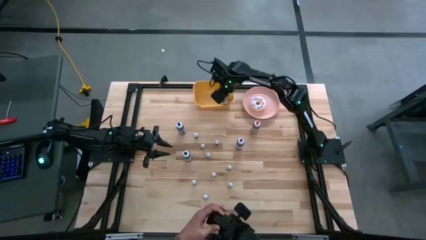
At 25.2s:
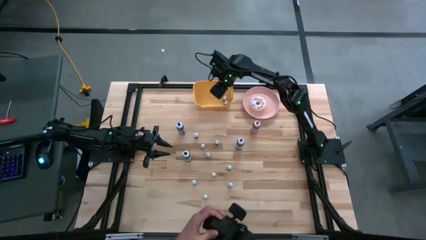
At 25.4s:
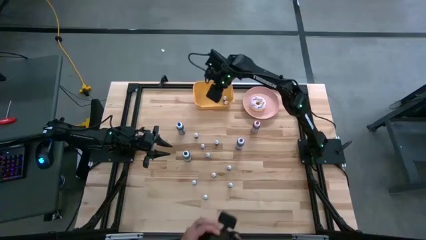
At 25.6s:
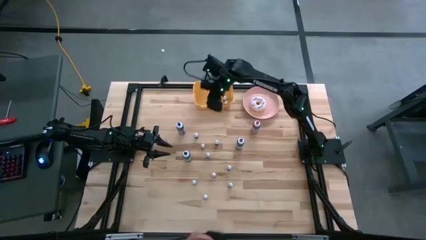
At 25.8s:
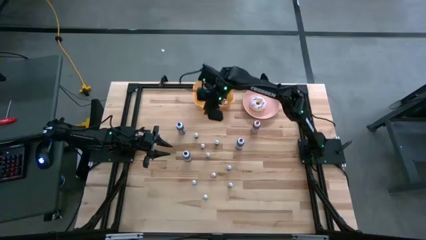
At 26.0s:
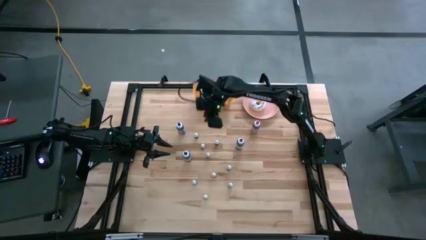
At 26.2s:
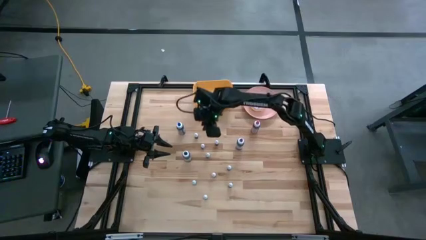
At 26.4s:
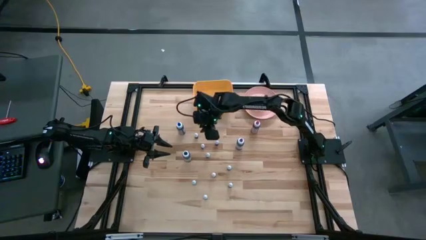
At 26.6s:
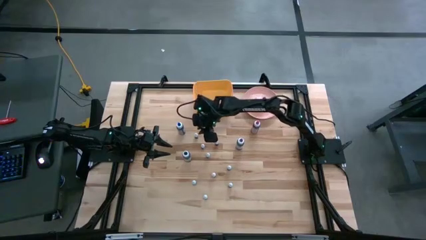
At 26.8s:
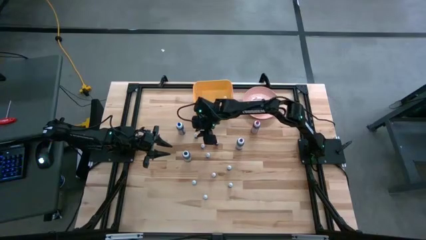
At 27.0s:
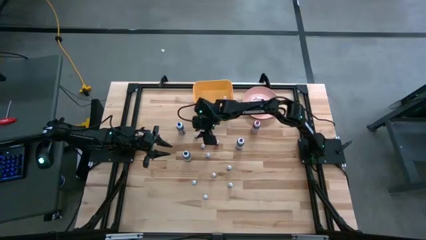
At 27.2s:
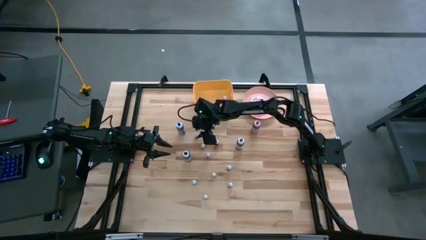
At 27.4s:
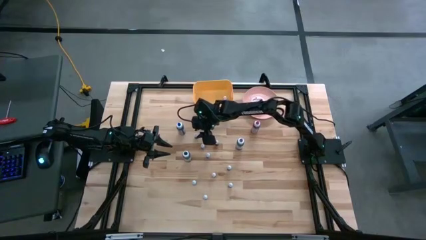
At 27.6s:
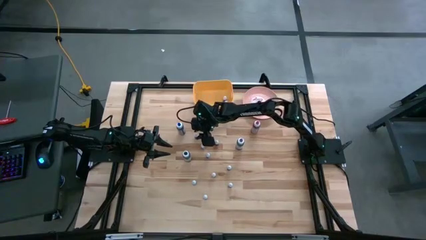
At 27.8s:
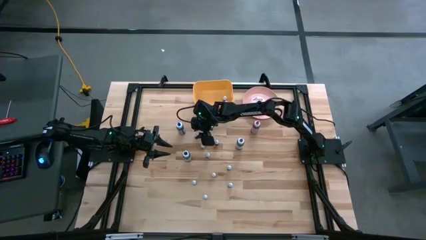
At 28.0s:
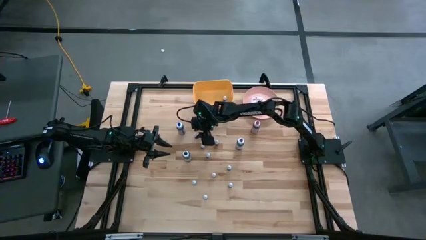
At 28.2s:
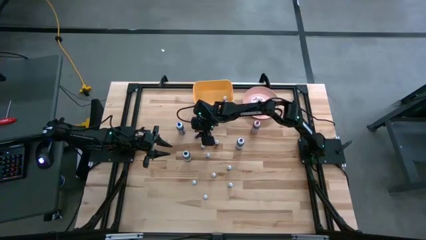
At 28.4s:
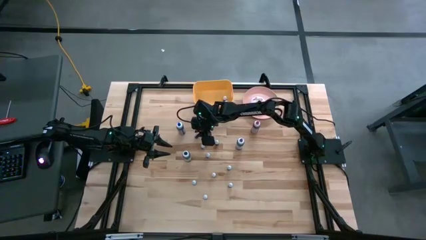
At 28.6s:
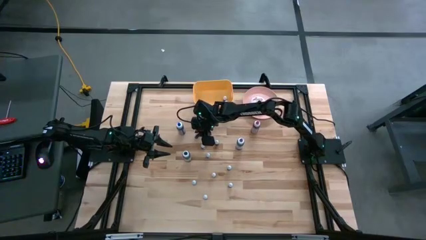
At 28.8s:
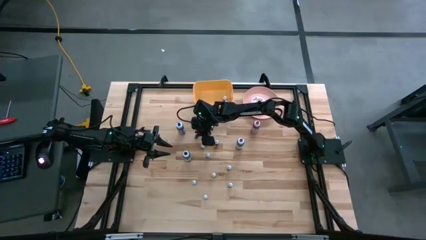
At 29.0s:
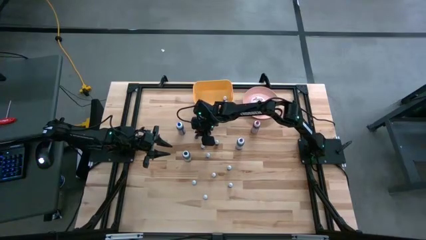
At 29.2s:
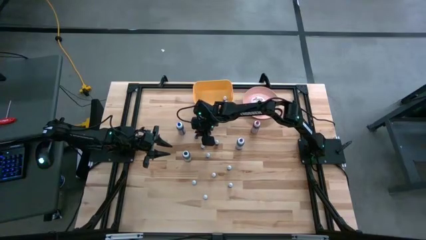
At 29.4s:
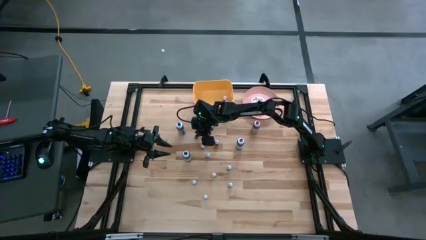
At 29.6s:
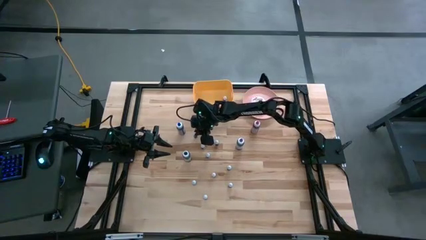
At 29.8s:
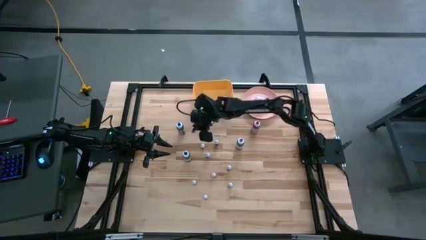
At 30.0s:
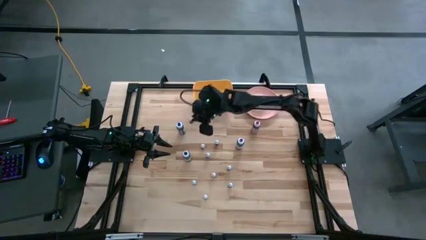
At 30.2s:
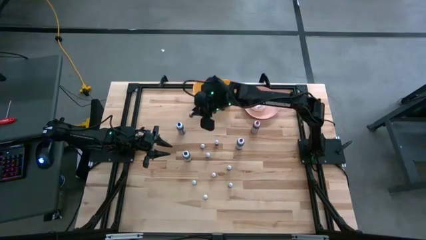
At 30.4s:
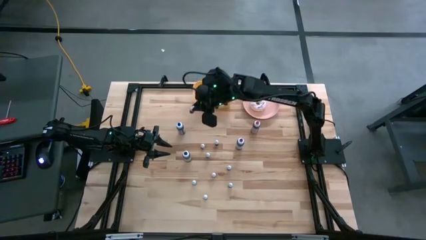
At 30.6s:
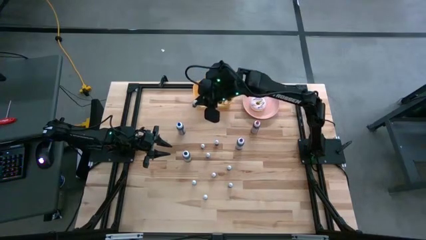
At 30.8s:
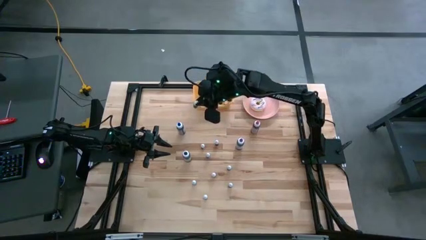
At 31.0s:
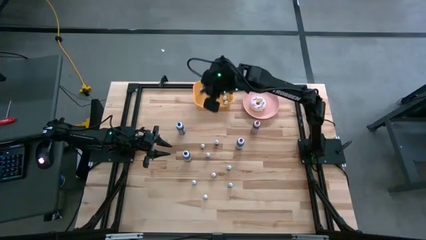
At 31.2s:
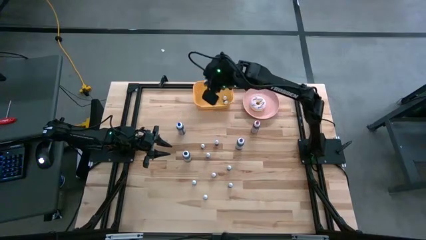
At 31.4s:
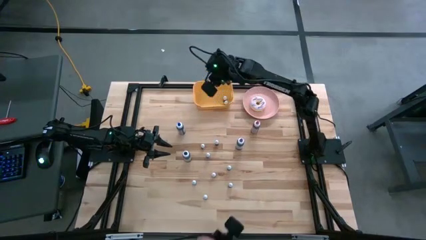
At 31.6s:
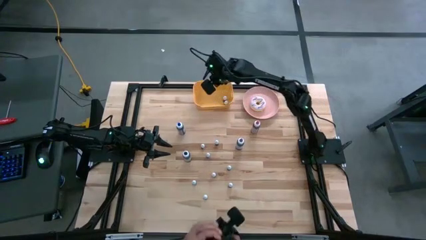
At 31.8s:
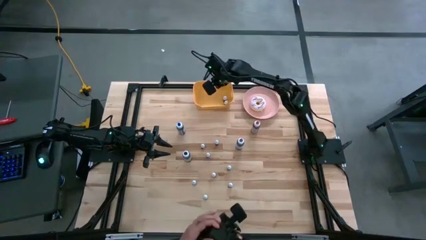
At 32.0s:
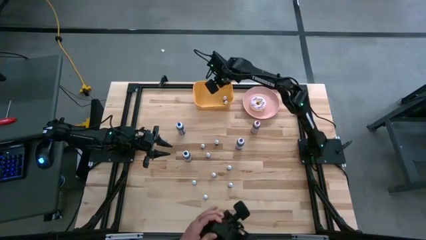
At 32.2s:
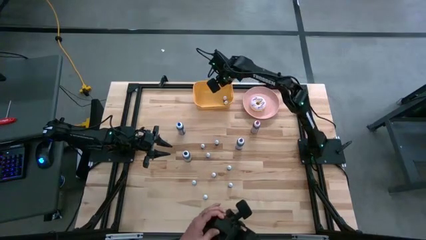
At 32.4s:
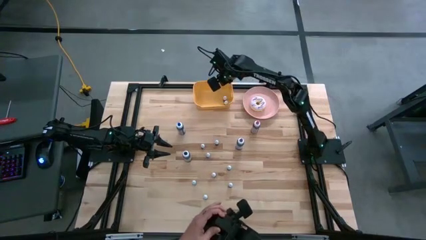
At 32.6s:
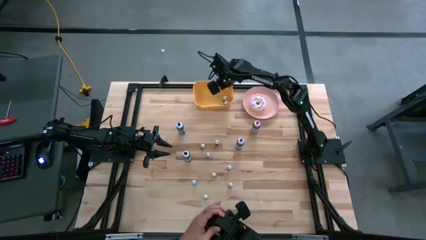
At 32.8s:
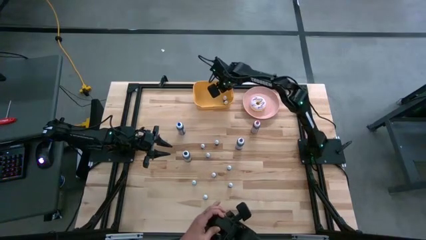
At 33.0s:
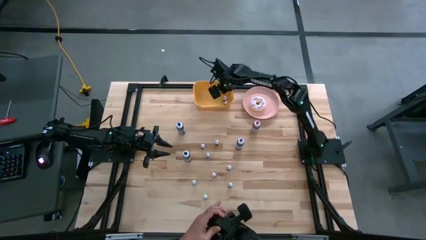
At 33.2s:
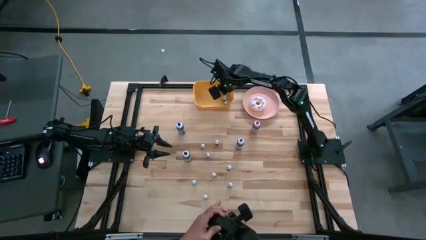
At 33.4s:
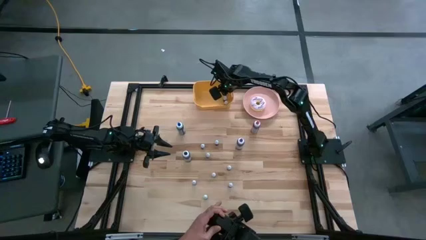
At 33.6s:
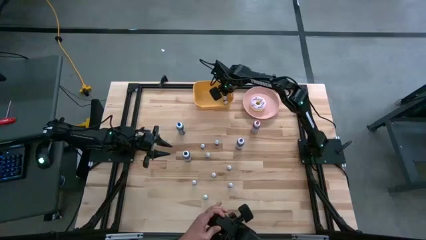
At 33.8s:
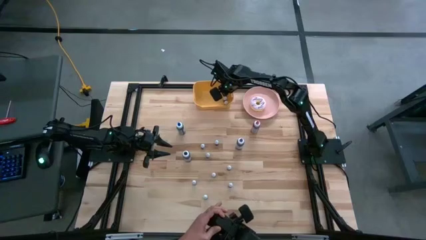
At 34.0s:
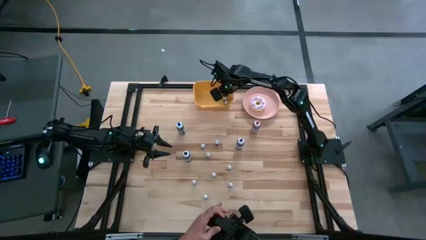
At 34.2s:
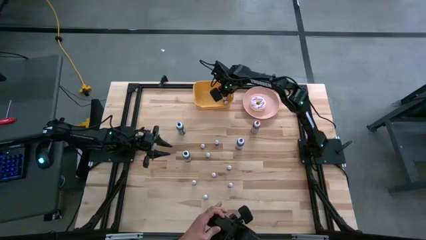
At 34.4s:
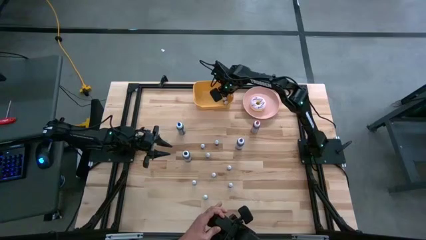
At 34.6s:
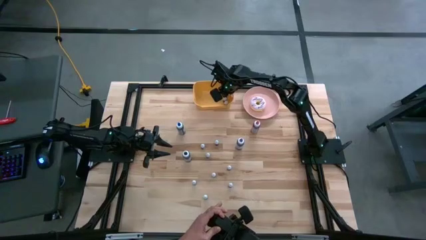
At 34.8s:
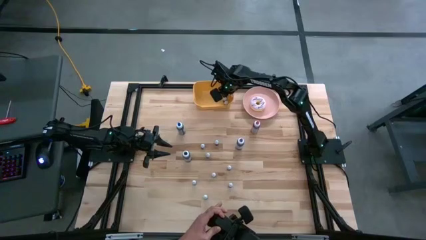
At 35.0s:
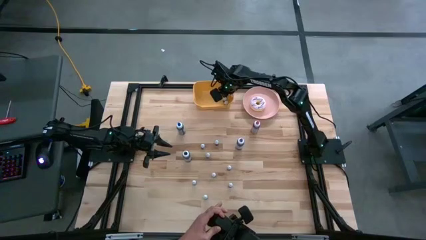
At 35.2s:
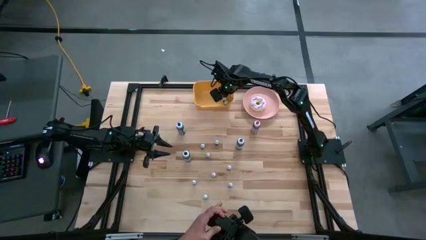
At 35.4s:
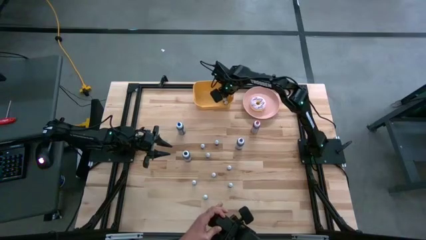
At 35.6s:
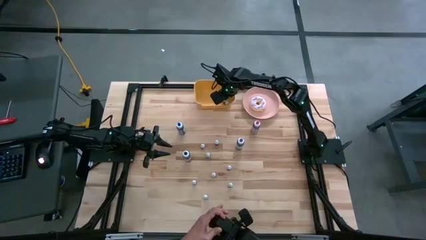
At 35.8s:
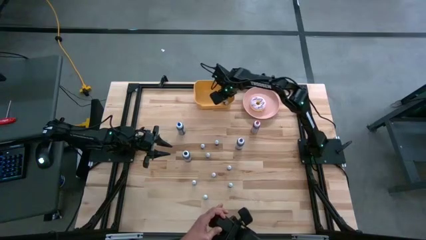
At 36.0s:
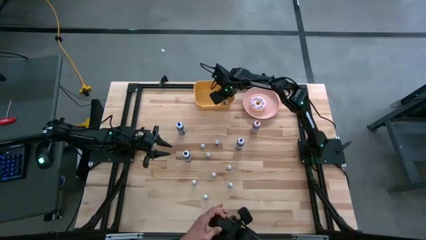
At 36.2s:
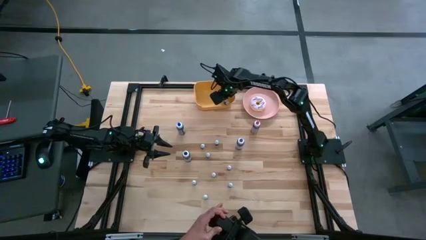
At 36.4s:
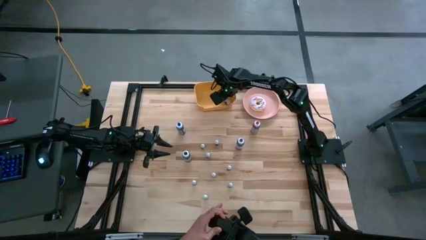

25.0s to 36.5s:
Task: Pick & Place food coloring
Put the small black food coloring bottle into the yellow bin
